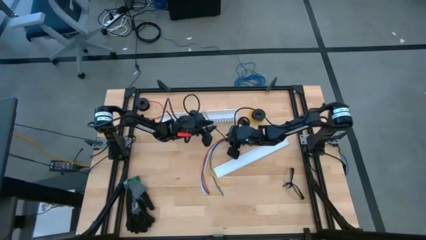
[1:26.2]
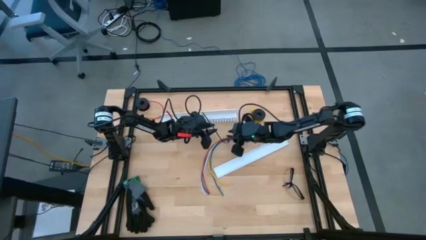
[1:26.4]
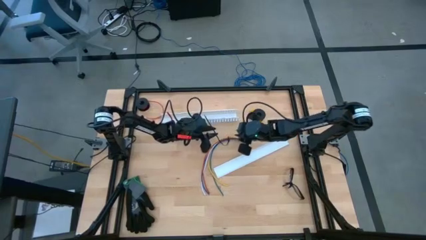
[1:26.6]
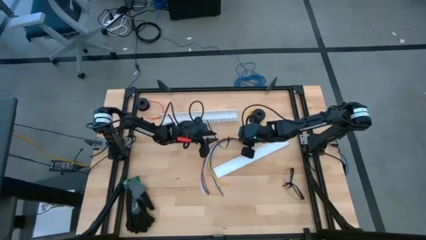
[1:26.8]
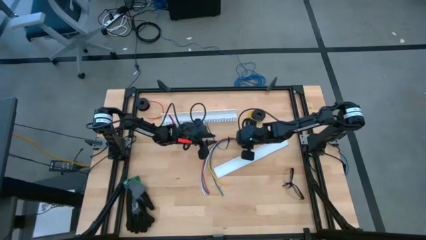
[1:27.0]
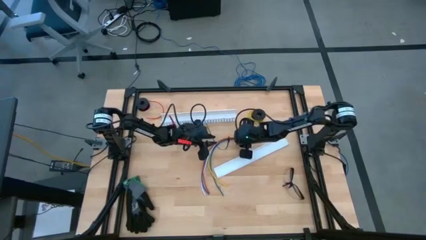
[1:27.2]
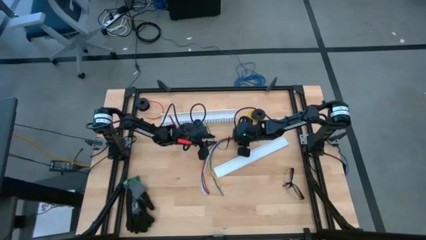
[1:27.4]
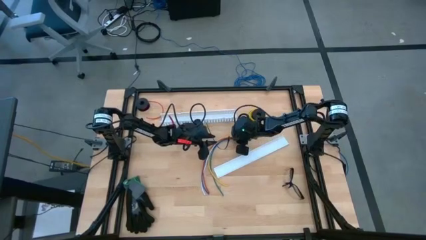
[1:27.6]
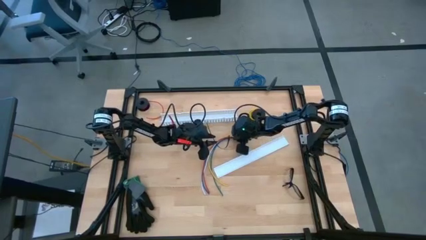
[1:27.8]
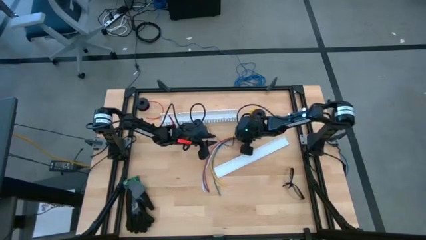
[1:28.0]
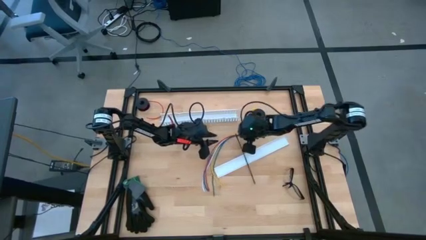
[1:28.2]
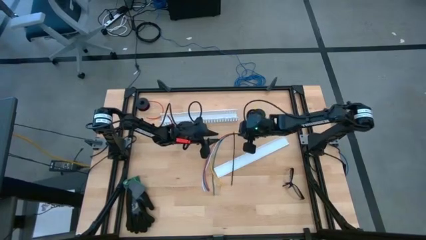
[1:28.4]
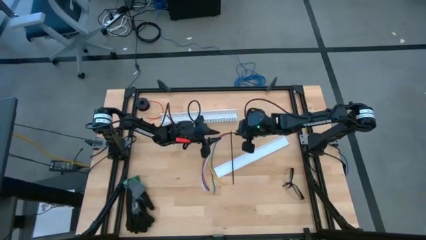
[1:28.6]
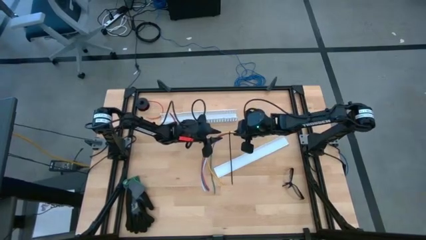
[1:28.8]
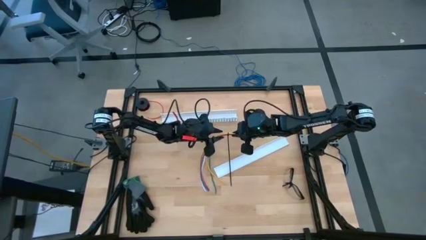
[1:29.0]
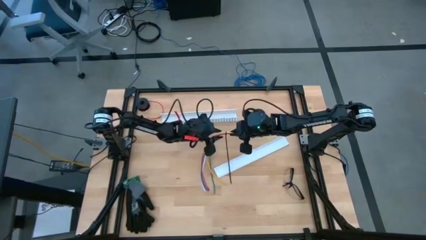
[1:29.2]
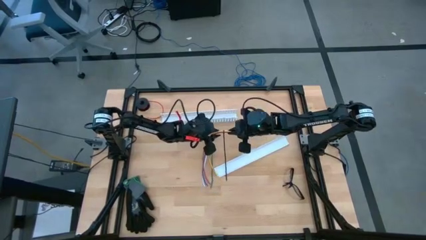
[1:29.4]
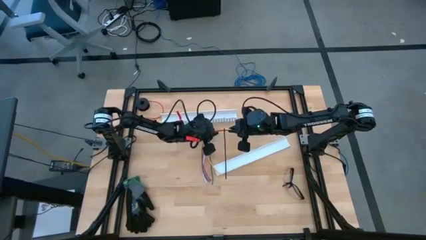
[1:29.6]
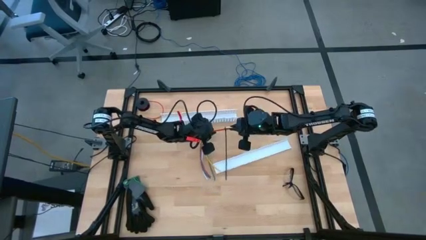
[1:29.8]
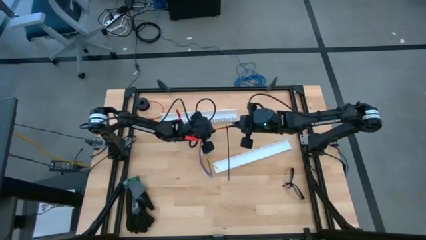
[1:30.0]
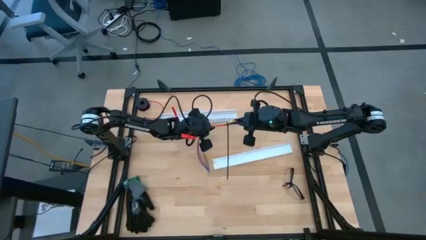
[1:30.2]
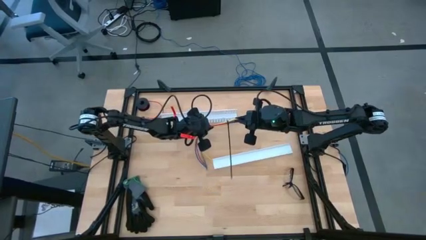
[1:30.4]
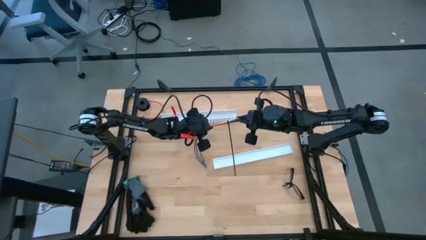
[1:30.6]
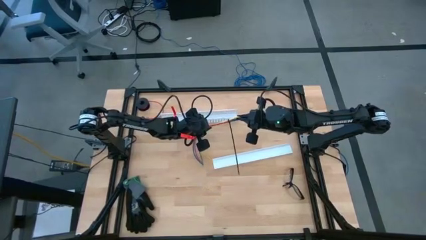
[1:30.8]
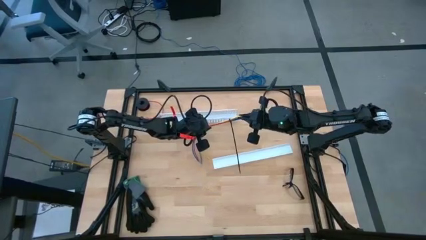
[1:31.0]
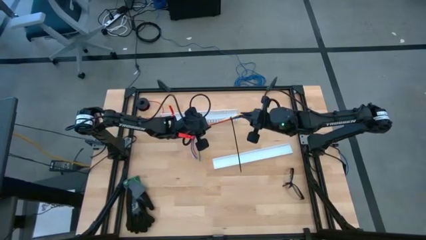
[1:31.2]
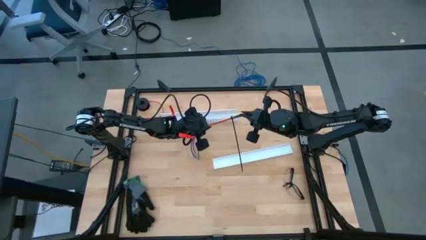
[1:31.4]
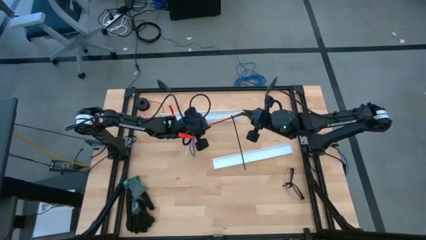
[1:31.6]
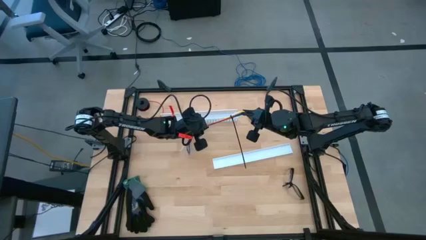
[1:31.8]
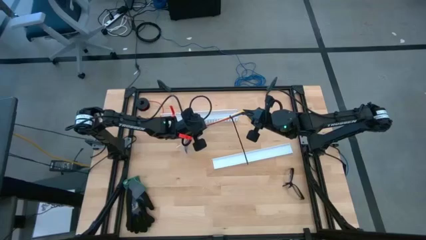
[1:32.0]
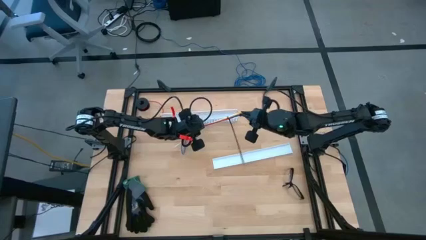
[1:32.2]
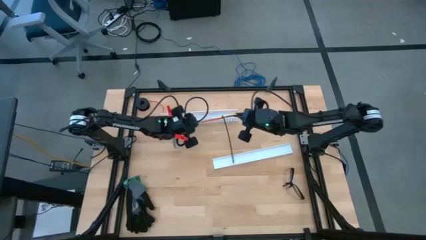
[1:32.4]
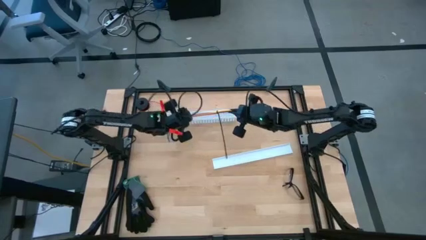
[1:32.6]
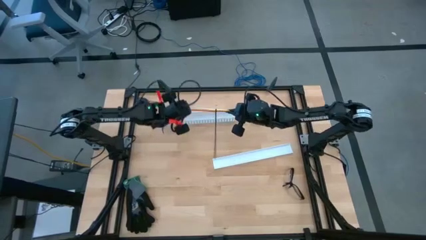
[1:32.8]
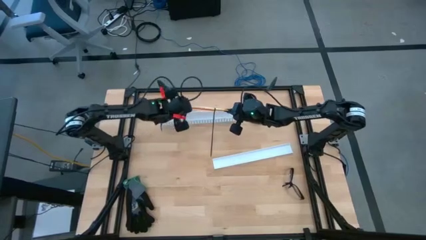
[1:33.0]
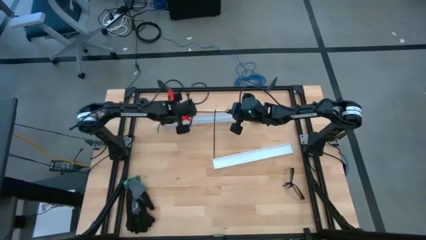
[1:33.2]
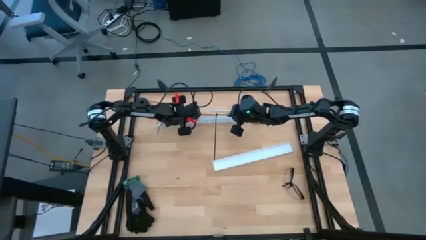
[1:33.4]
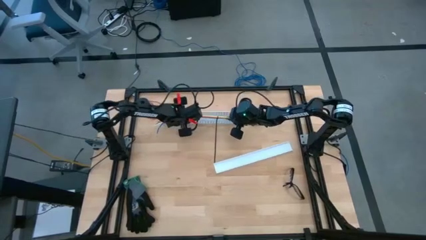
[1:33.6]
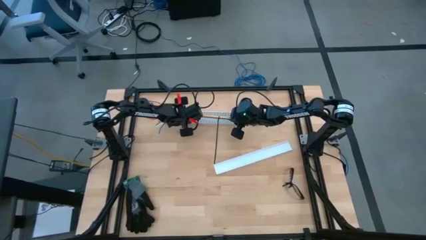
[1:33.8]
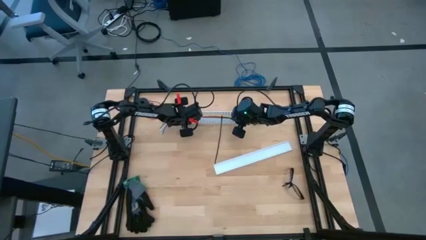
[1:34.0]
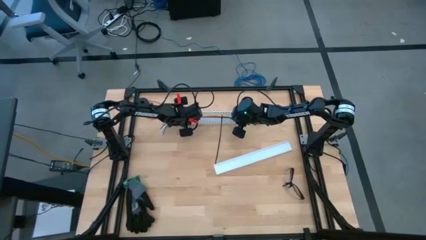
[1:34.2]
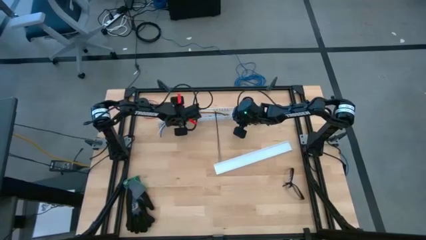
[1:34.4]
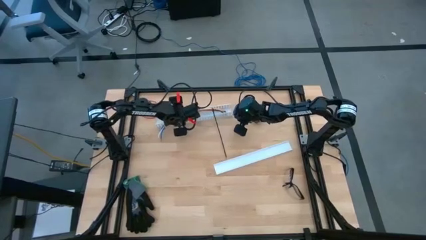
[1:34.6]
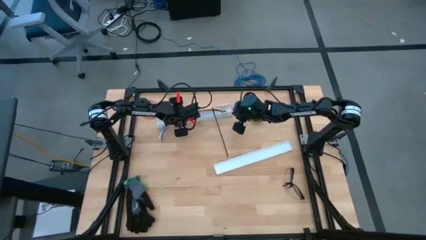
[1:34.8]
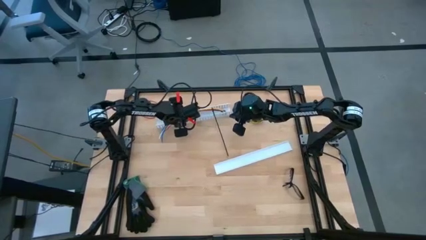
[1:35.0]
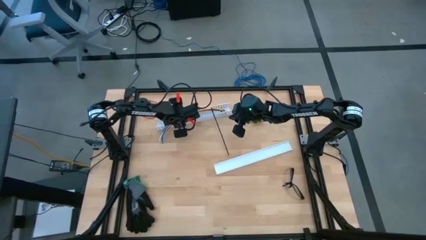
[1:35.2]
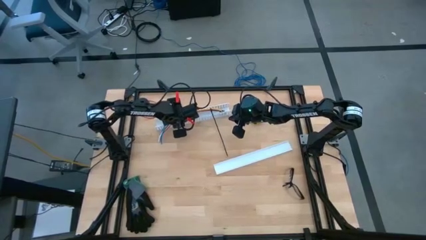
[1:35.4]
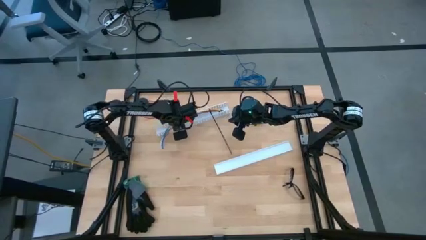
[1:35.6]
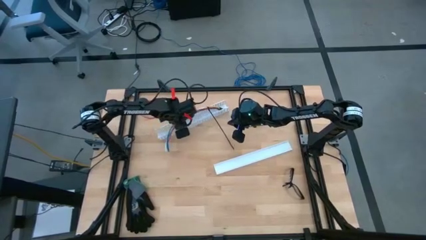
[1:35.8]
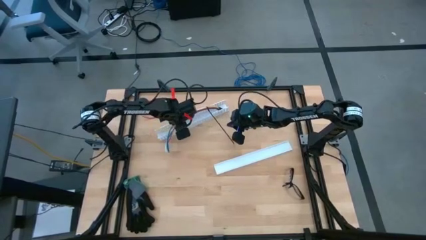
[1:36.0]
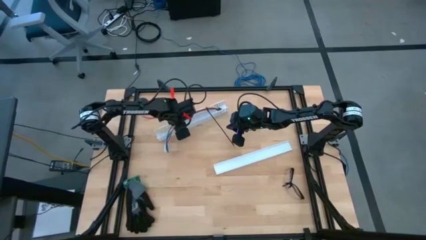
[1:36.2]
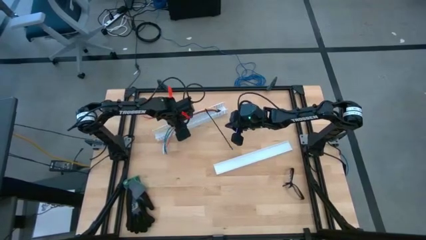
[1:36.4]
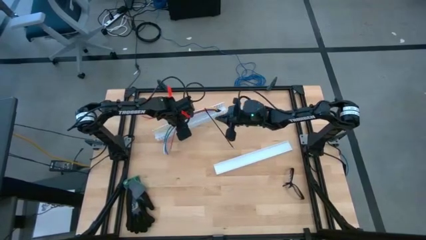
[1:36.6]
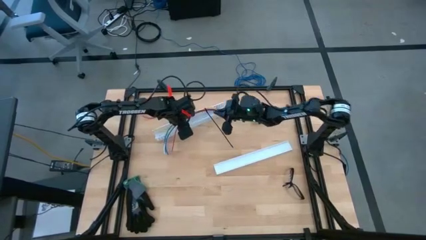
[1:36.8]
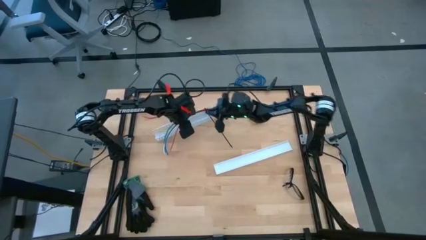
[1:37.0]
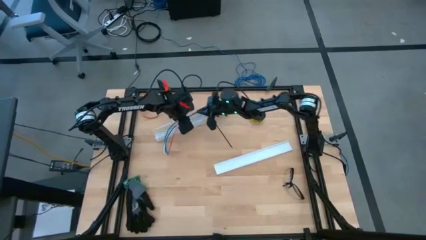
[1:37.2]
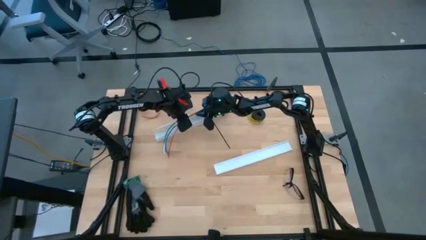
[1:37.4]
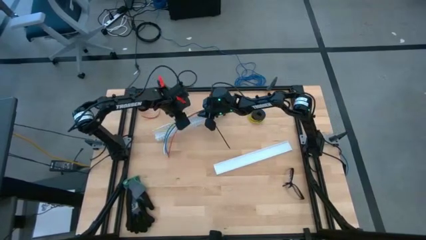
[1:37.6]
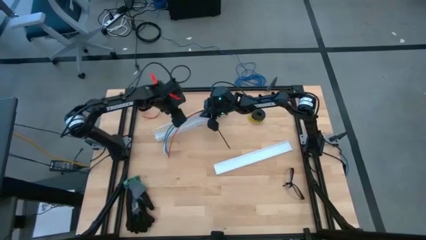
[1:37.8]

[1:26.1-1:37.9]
Task: Ziptie cables
Put the ziptied cables in the white cable duct
